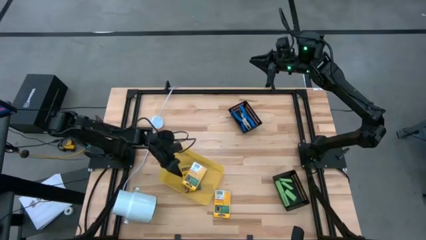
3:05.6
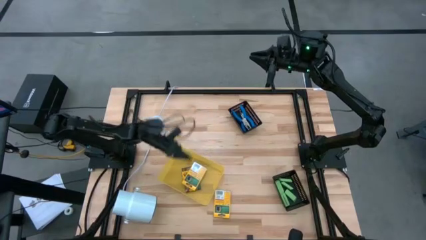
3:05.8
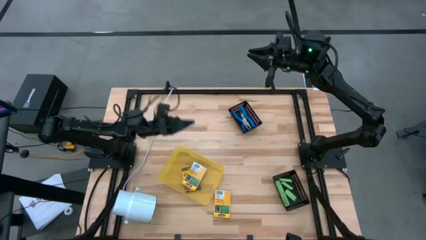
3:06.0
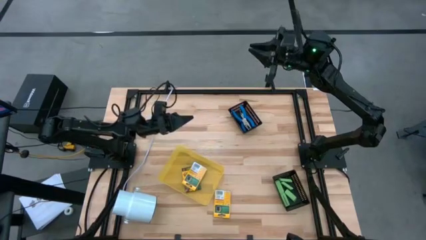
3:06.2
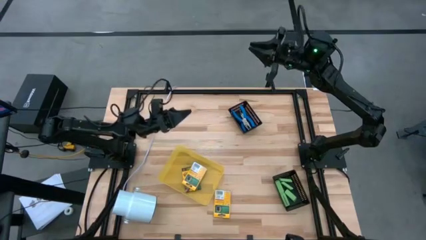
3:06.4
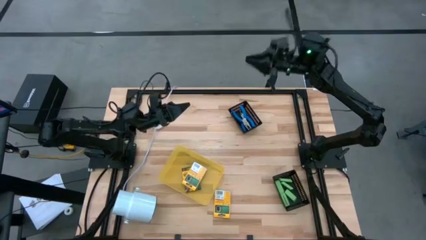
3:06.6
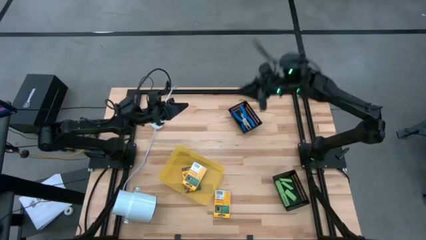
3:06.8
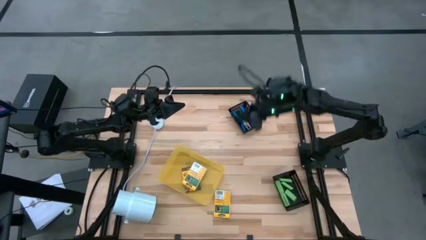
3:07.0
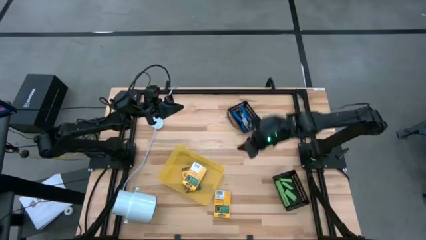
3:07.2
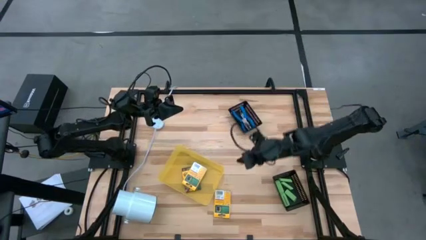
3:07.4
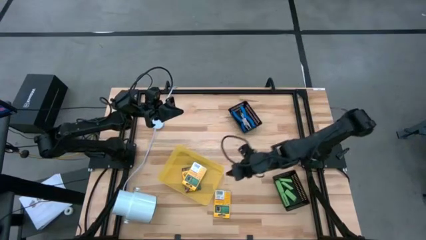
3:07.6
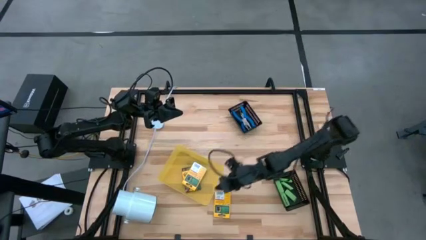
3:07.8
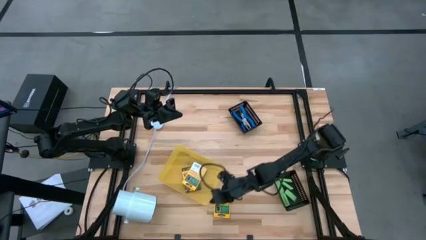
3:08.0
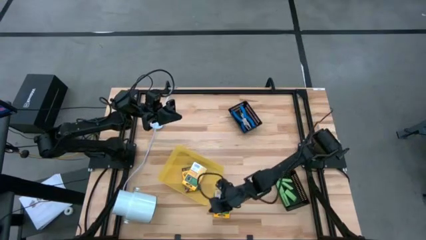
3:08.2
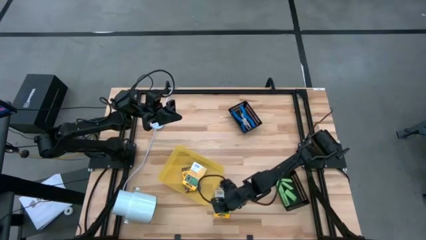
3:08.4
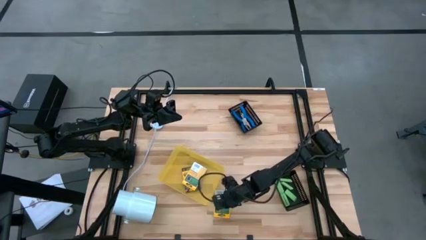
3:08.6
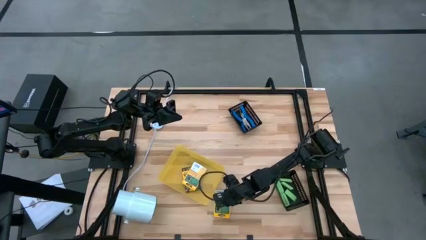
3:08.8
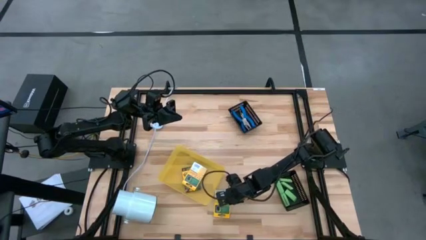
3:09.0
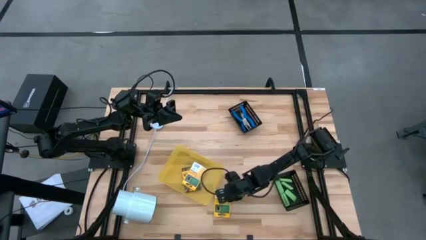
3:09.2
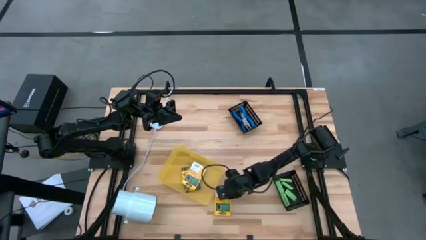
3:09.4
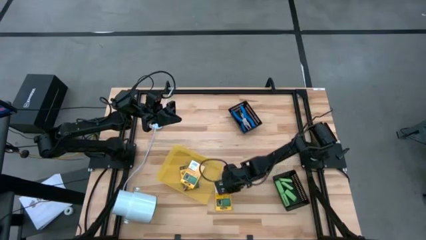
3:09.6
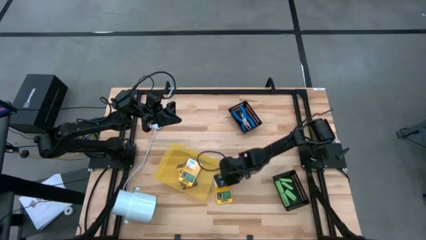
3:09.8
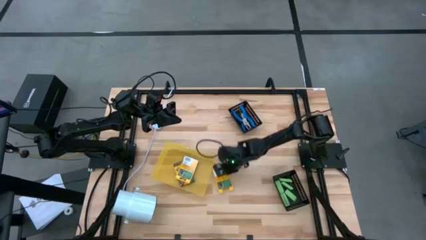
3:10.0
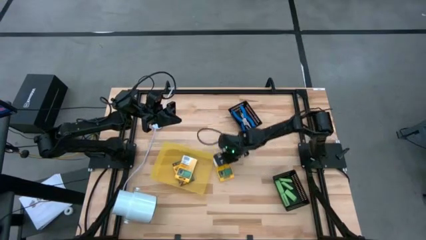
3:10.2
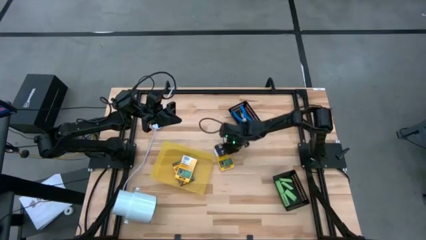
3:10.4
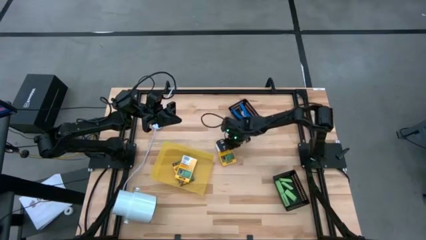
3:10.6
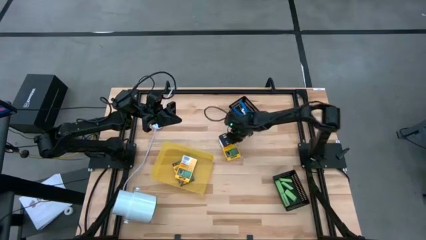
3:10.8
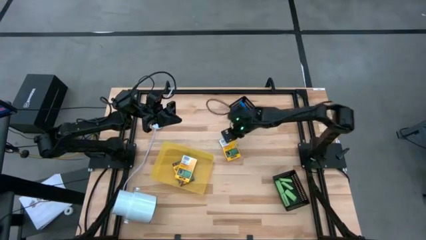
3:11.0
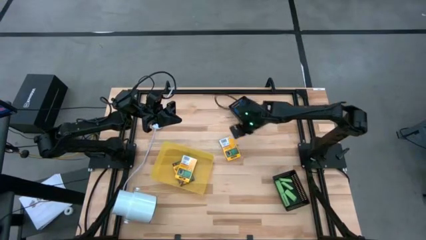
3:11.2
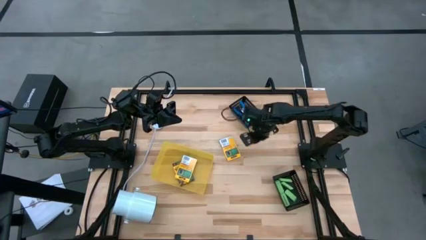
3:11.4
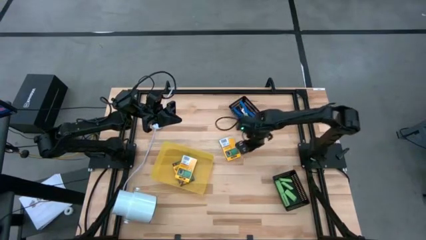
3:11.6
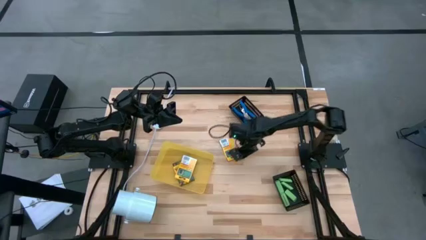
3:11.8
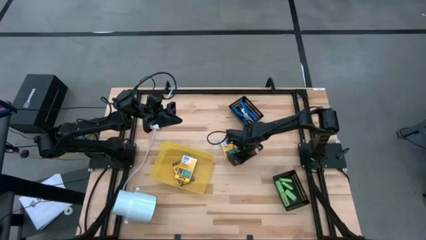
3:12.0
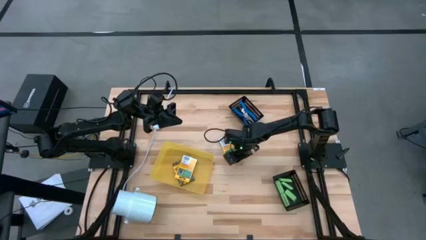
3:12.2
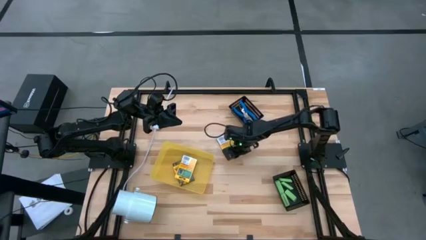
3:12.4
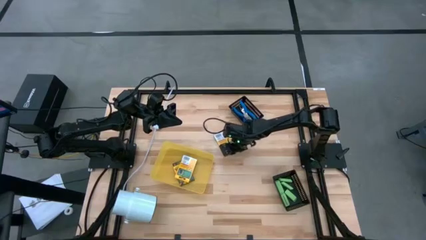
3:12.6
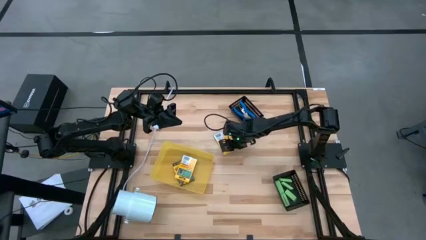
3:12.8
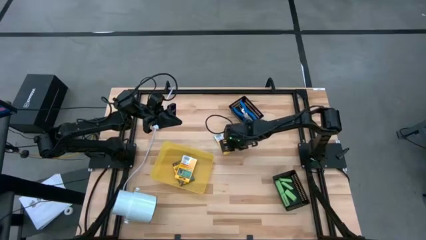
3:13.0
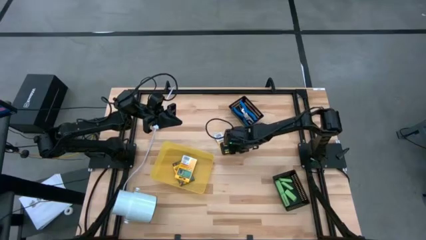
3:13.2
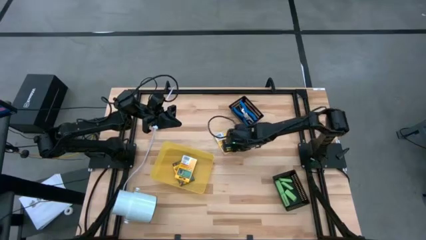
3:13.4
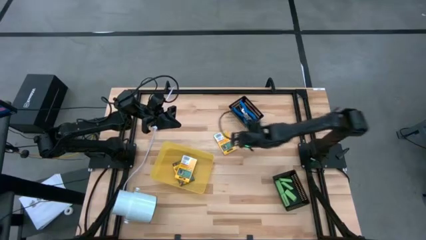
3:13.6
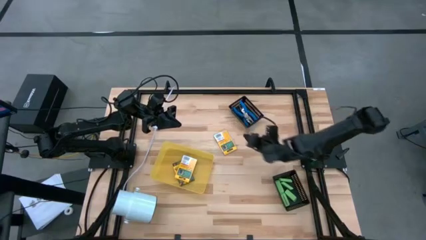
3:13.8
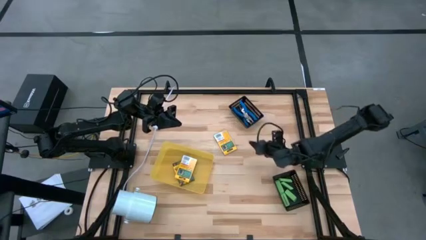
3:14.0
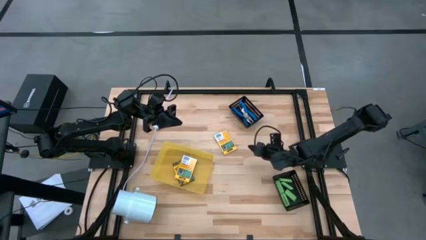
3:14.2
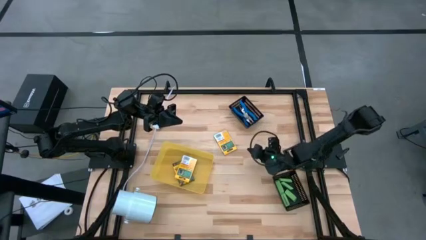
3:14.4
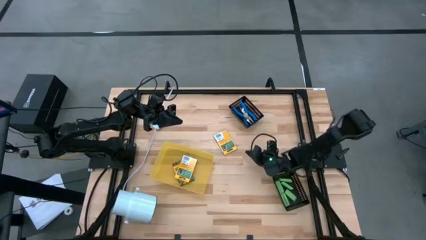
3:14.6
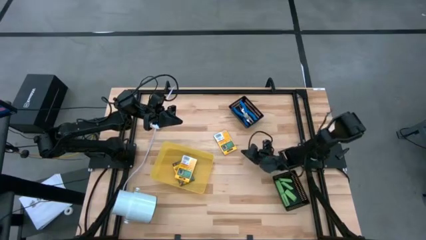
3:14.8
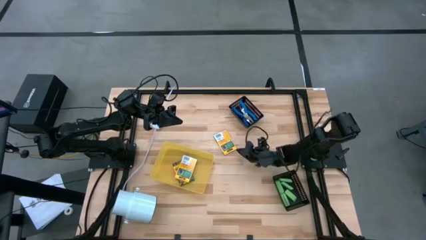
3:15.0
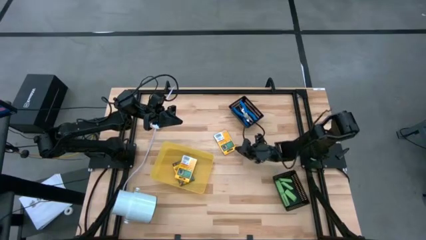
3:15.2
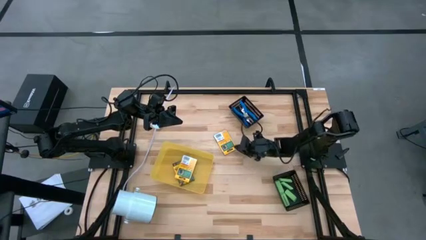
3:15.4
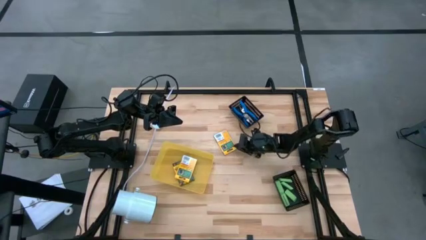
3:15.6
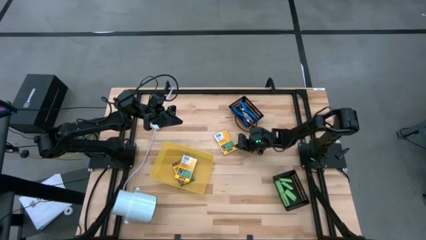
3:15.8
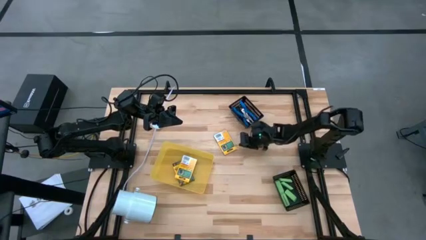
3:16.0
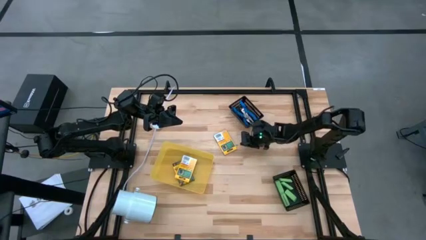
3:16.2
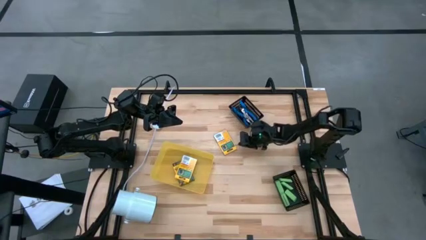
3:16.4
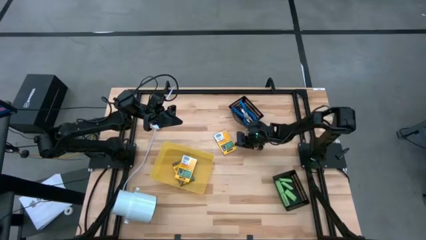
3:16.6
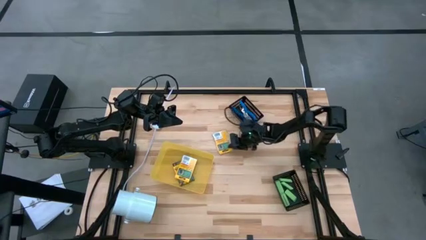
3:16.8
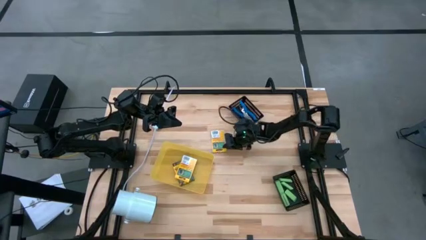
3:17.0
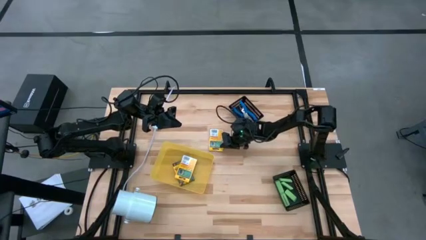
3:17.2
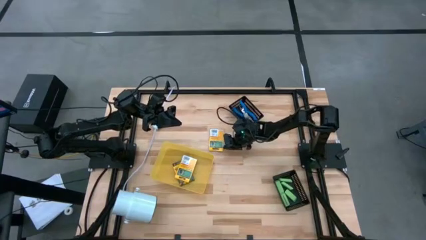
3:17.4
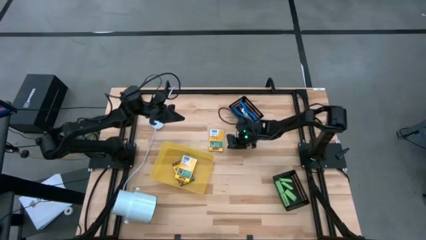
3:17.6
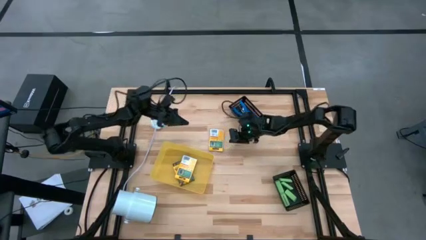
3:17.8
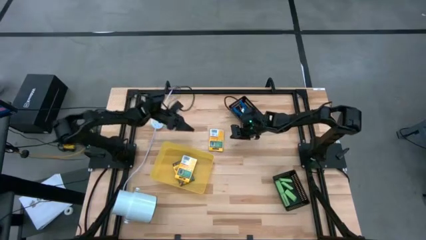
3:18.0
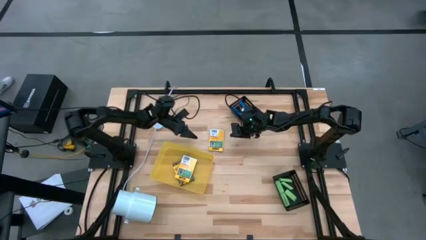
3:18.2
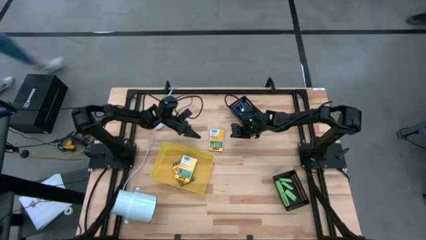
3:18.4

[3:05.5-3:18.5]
Task: Pick & Place School Supplies
Put the pack of crayon into the yellow bin

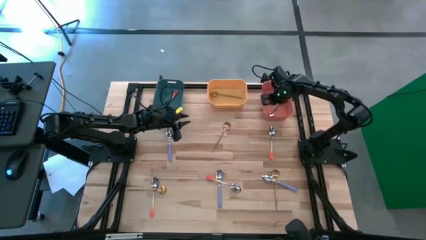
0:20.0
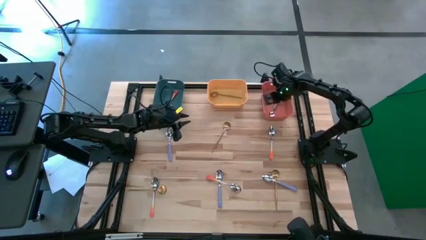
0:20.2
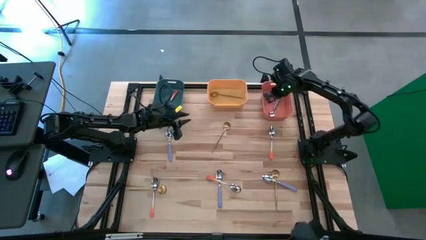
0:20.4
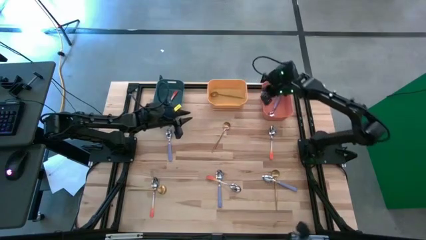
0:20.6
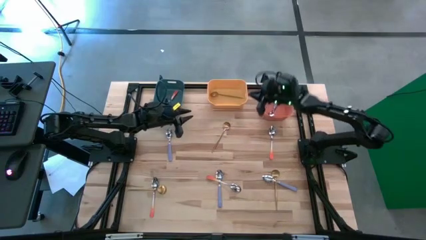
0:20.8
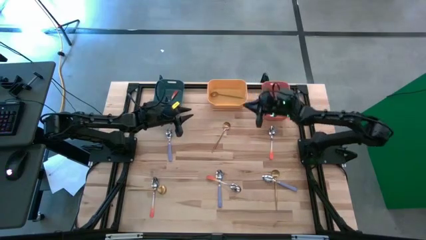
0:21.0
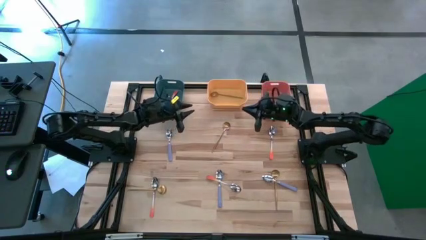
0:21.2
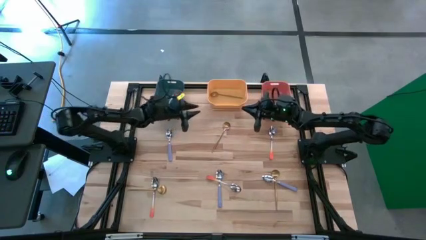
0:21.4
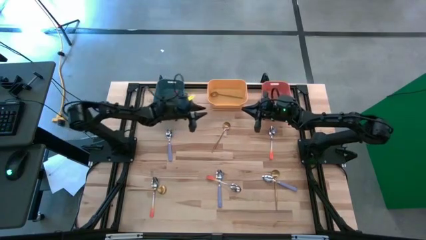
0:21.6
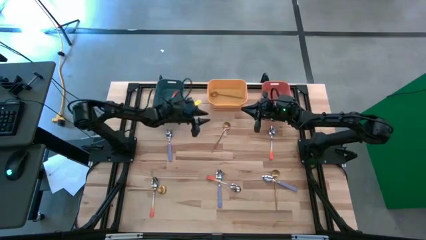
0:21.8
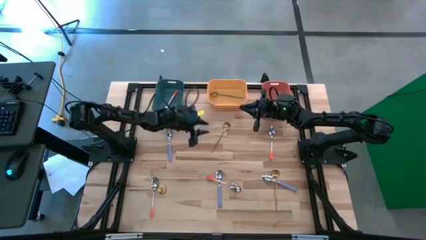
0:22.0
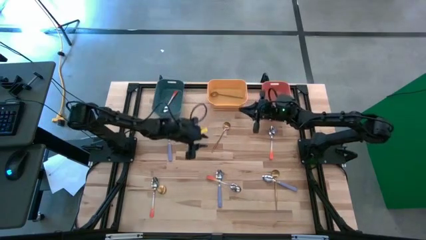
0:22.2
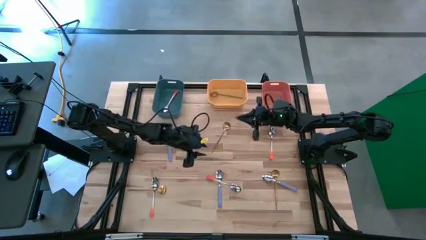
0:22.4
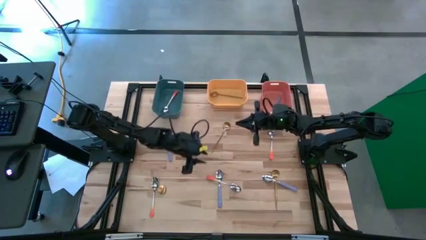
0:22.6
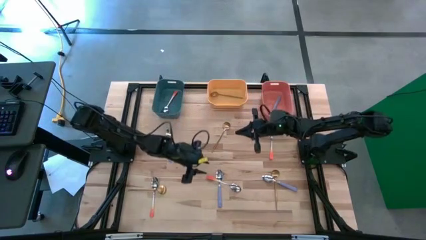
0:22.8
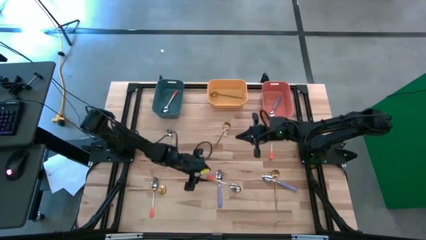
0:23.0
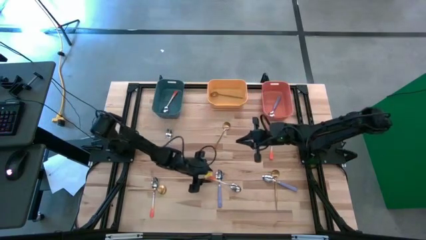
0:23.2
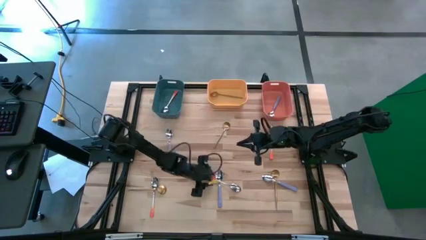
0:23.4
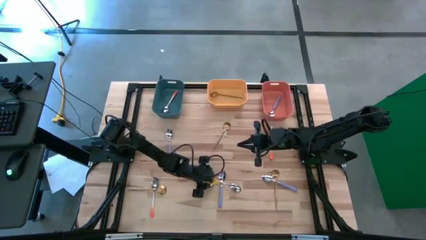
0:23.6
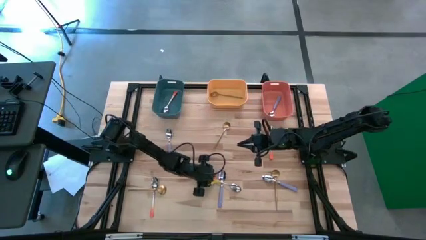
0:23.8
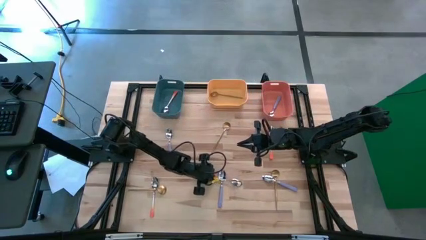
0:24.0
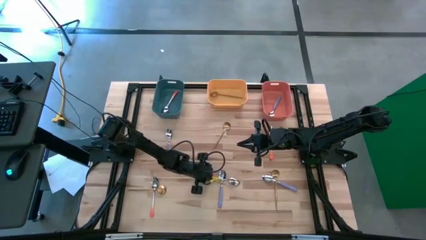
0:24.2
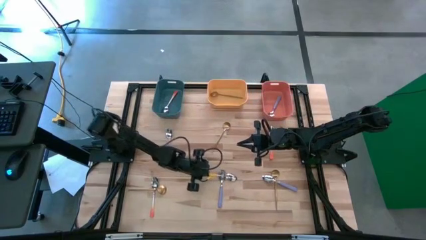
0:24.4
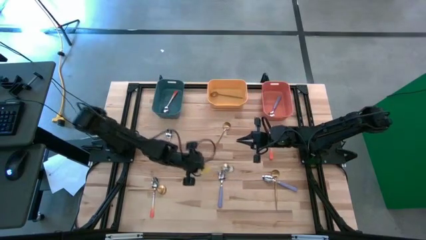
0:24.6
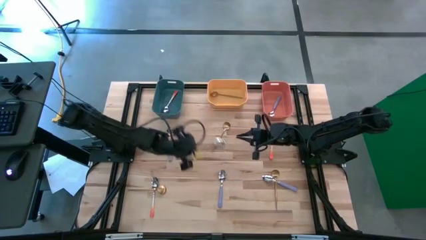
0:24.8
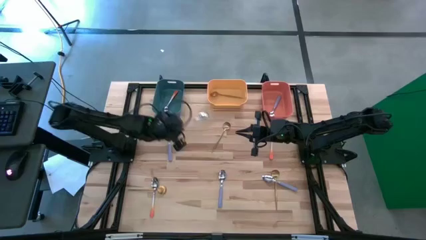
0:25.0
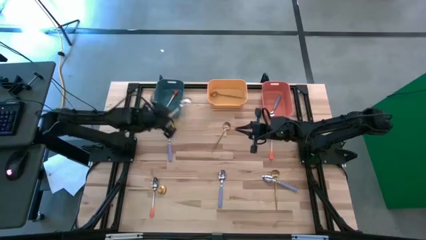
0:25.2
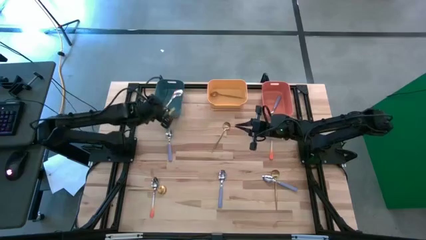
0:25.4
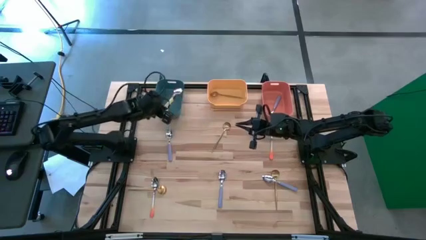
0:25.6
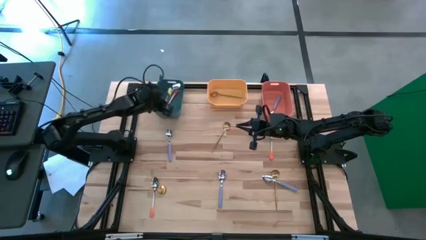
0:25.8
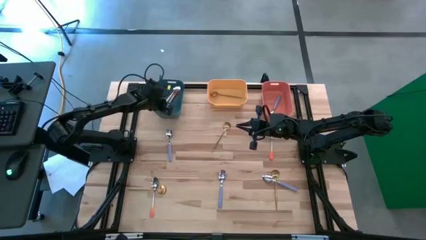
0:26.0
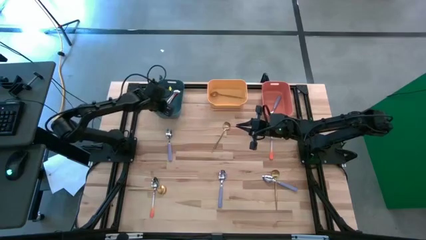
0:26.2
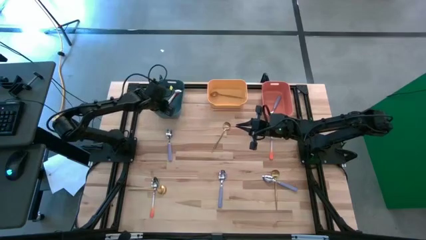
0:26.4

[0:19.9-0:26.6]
Task: Sort silverware by color (type)
Put the bottom right orange spoon into the blue bin
